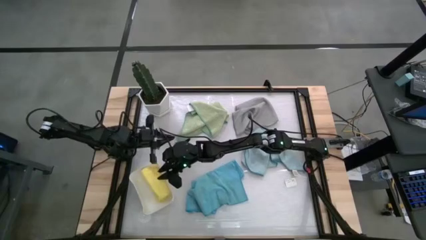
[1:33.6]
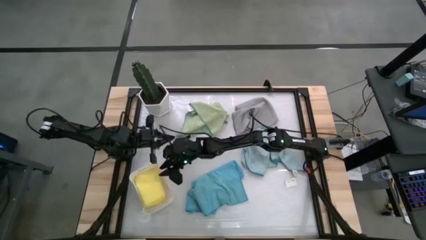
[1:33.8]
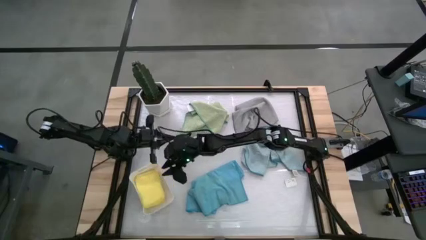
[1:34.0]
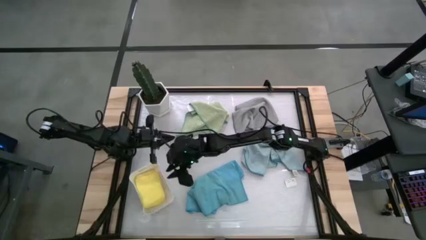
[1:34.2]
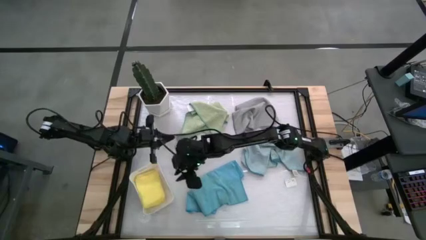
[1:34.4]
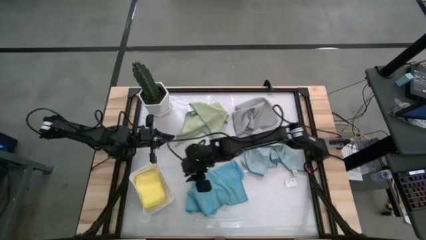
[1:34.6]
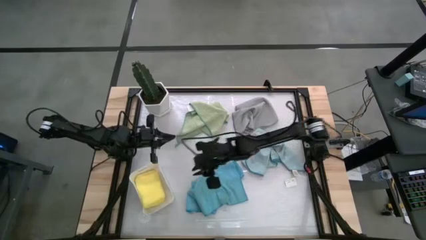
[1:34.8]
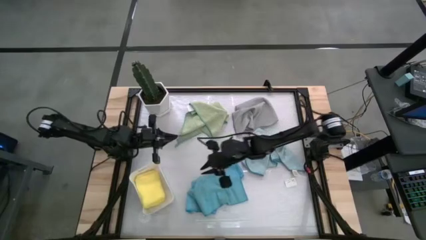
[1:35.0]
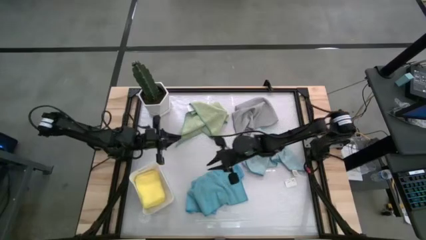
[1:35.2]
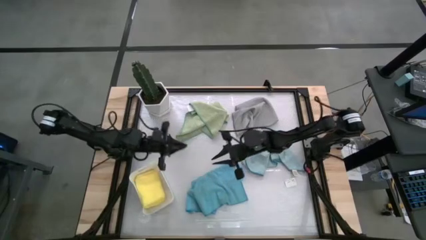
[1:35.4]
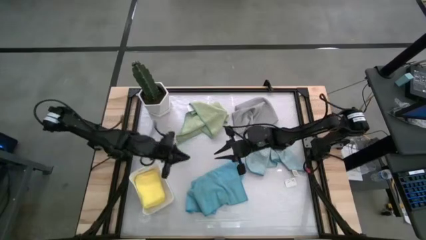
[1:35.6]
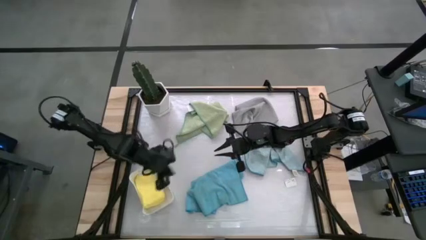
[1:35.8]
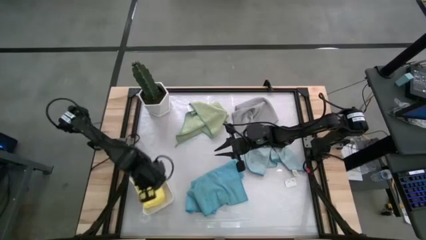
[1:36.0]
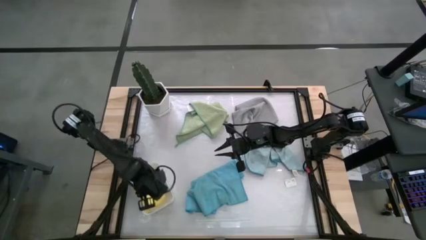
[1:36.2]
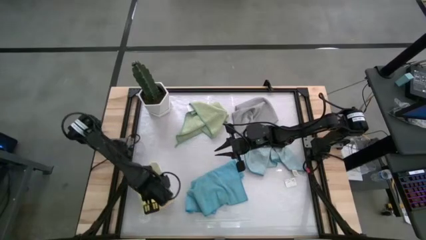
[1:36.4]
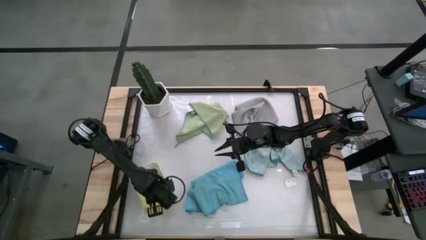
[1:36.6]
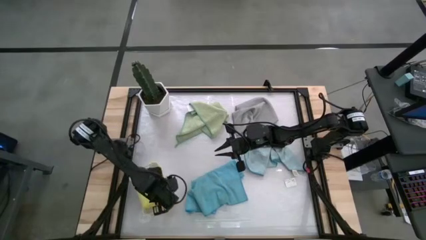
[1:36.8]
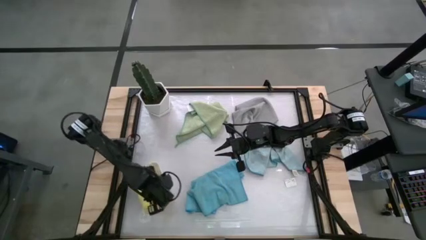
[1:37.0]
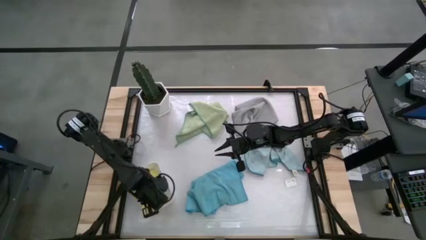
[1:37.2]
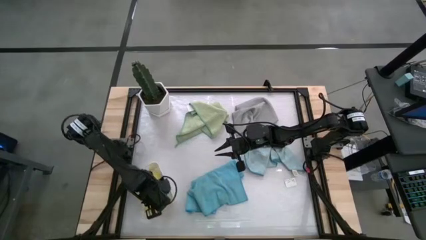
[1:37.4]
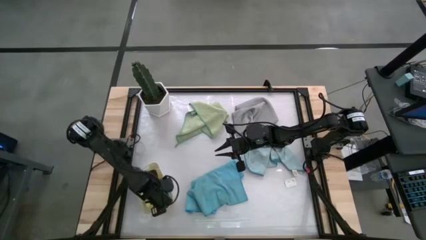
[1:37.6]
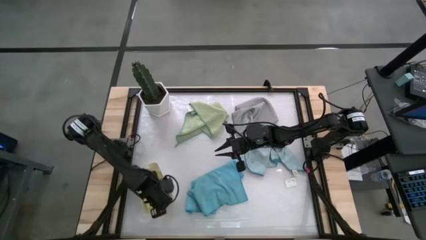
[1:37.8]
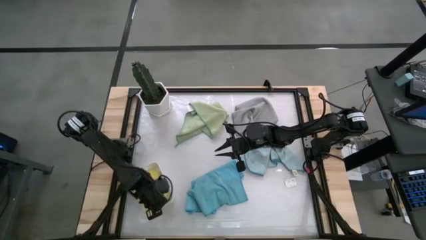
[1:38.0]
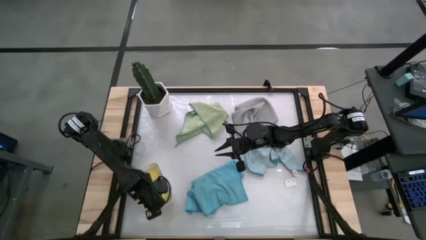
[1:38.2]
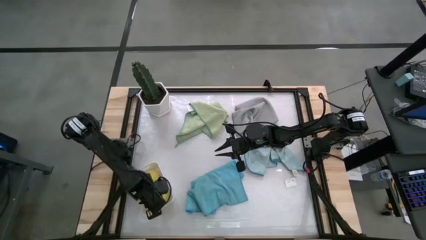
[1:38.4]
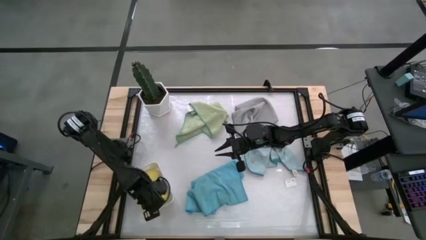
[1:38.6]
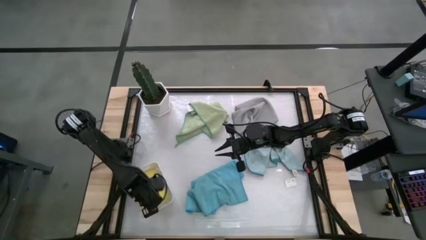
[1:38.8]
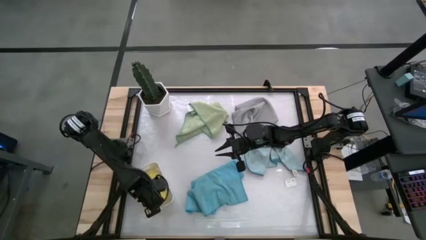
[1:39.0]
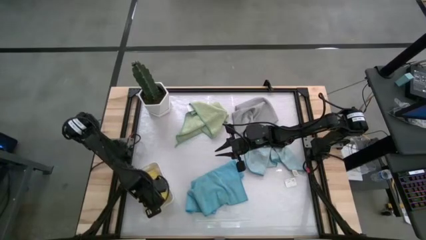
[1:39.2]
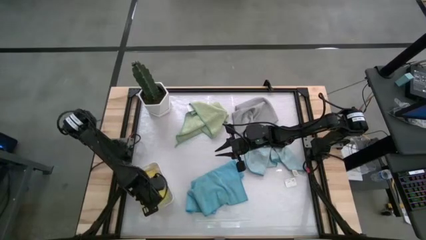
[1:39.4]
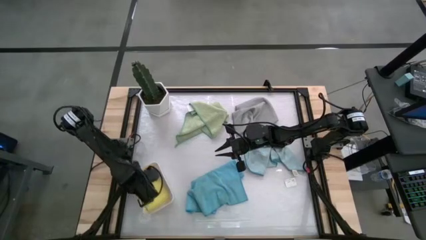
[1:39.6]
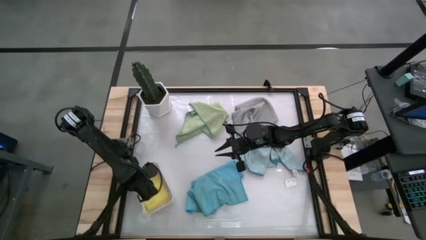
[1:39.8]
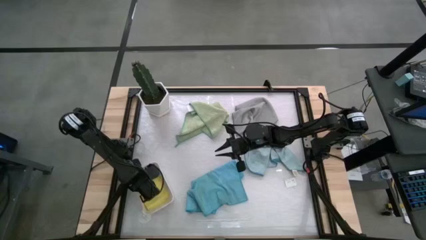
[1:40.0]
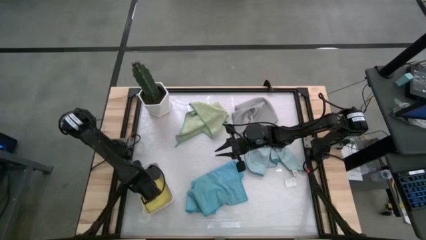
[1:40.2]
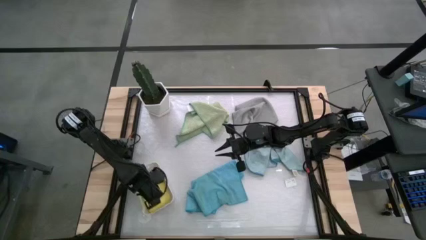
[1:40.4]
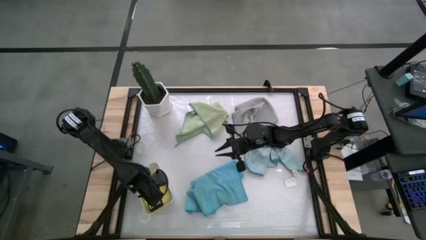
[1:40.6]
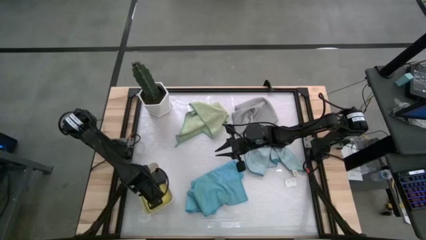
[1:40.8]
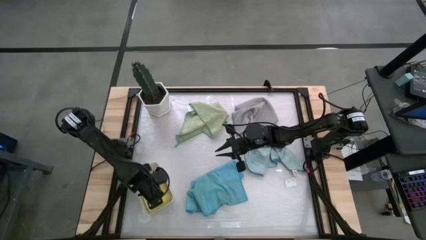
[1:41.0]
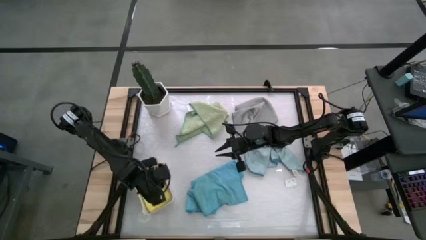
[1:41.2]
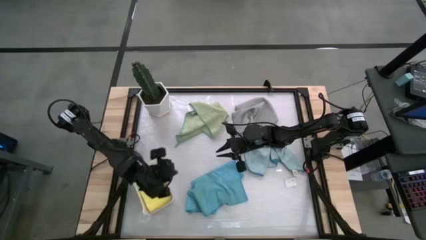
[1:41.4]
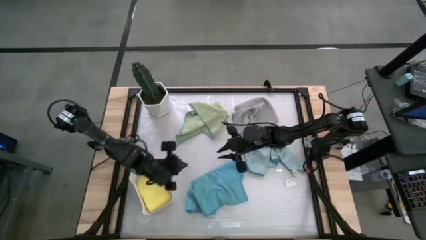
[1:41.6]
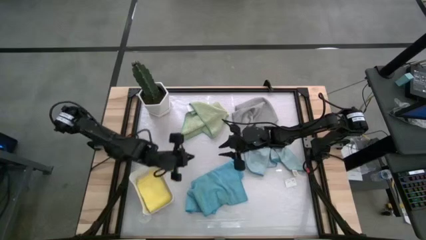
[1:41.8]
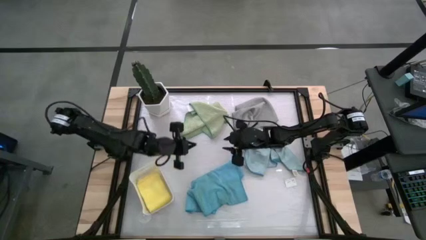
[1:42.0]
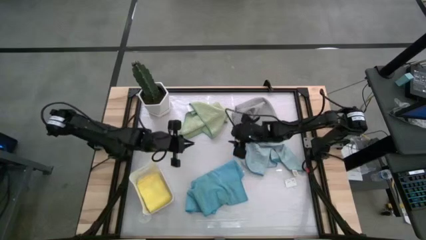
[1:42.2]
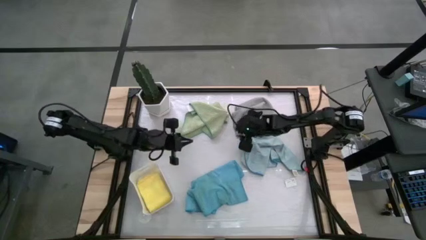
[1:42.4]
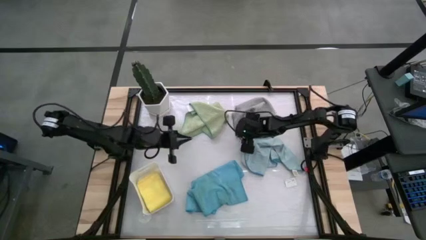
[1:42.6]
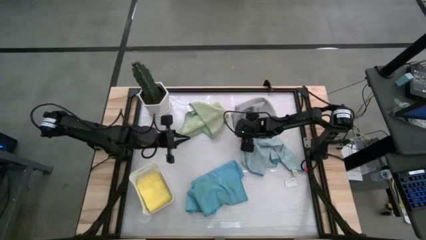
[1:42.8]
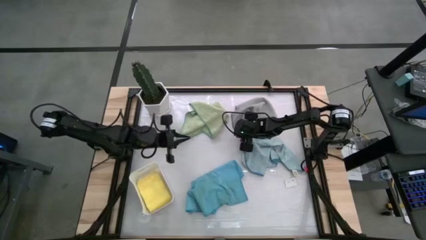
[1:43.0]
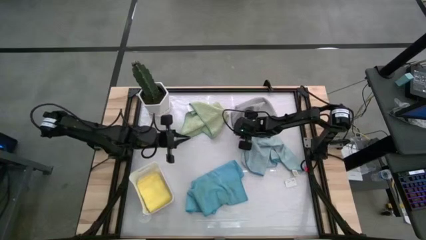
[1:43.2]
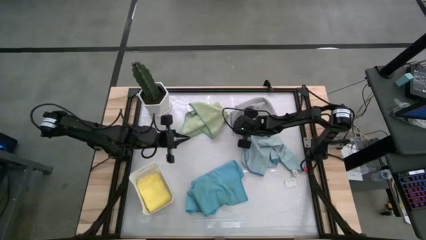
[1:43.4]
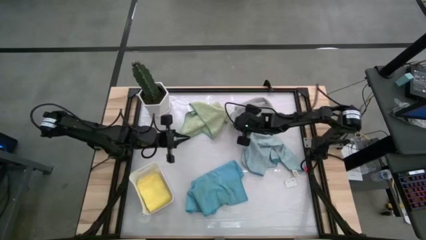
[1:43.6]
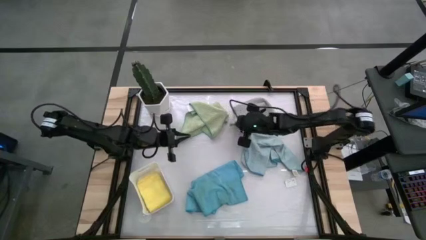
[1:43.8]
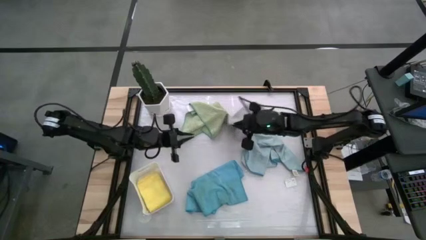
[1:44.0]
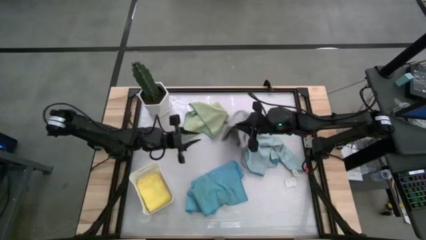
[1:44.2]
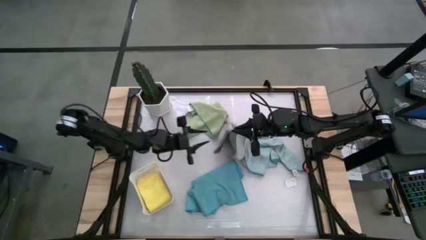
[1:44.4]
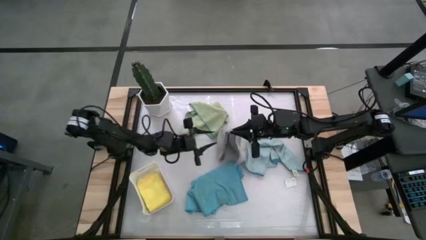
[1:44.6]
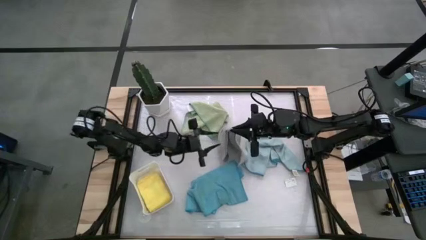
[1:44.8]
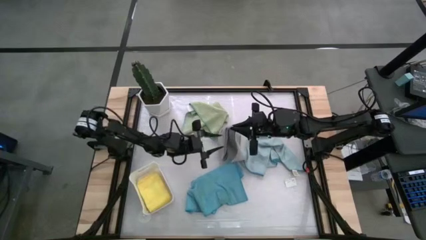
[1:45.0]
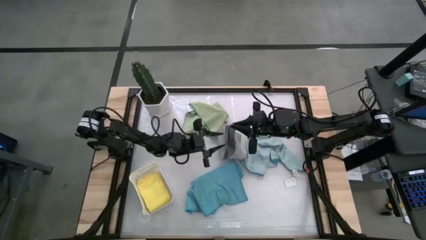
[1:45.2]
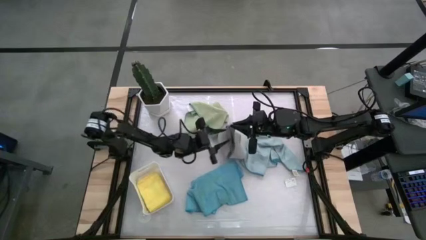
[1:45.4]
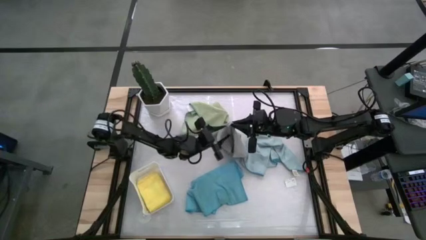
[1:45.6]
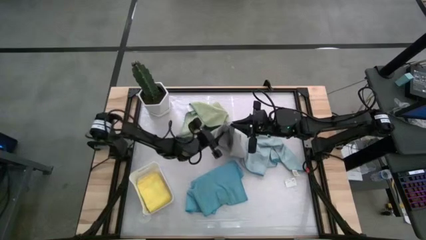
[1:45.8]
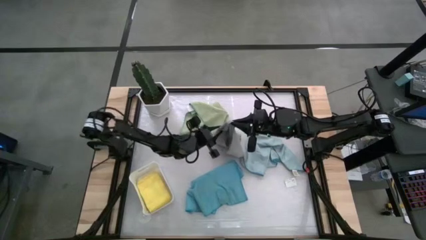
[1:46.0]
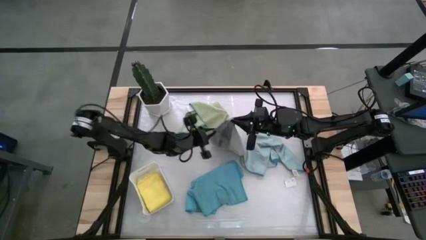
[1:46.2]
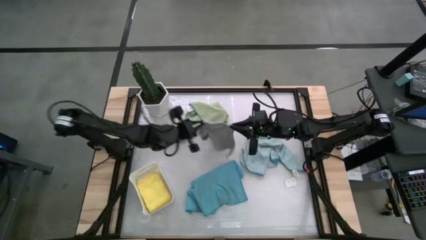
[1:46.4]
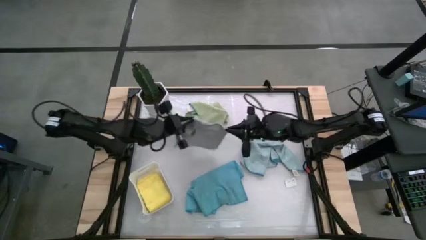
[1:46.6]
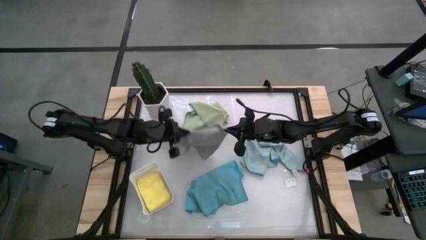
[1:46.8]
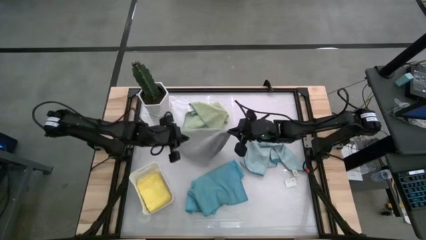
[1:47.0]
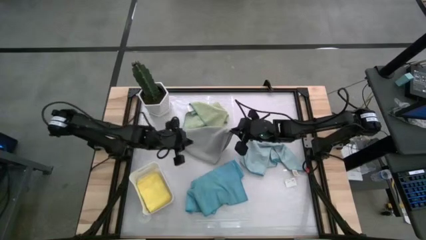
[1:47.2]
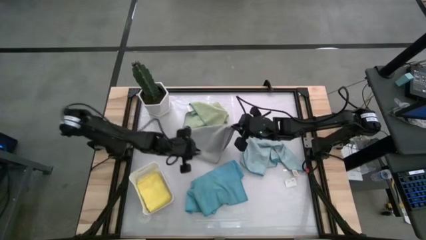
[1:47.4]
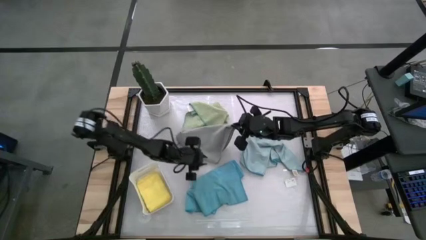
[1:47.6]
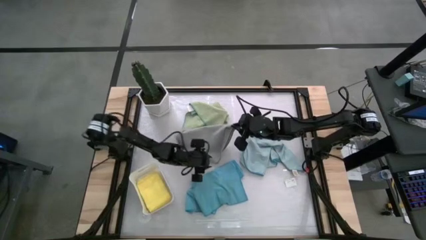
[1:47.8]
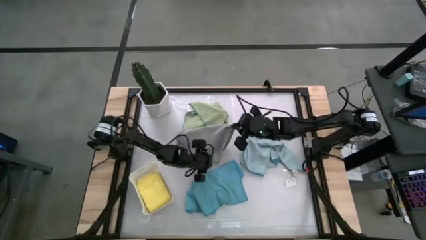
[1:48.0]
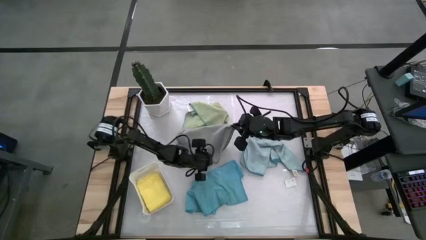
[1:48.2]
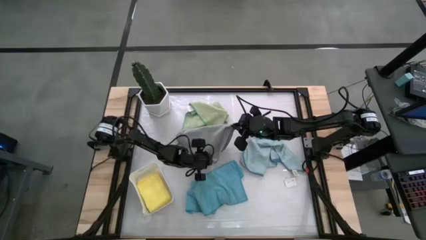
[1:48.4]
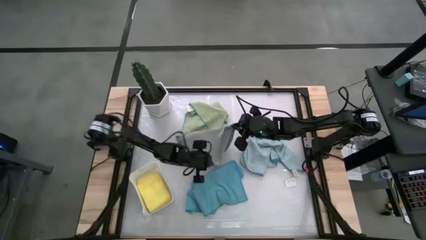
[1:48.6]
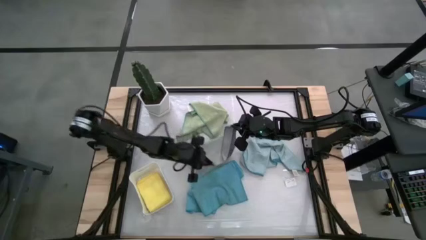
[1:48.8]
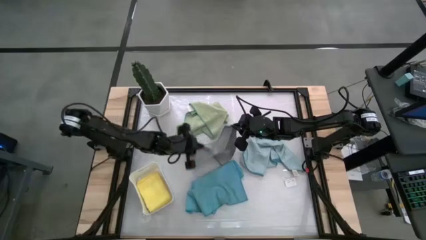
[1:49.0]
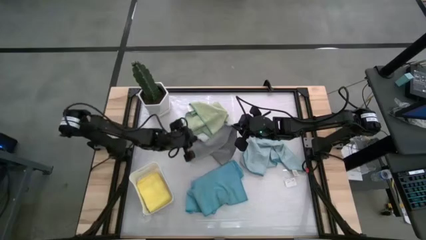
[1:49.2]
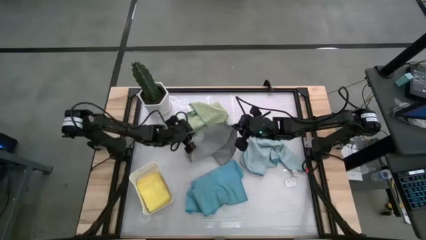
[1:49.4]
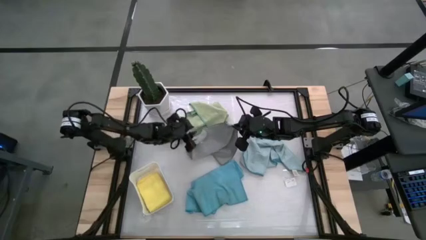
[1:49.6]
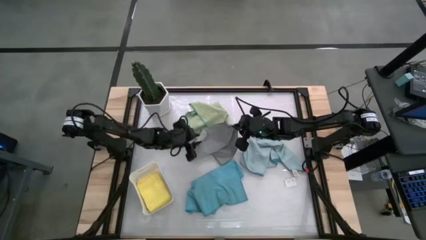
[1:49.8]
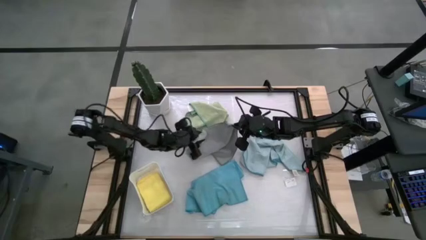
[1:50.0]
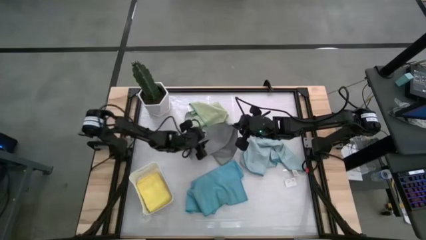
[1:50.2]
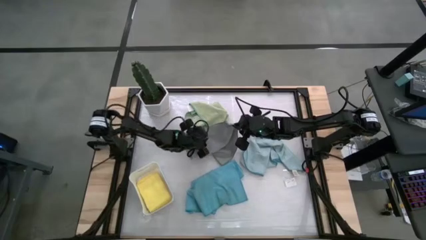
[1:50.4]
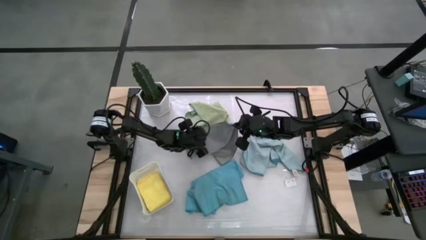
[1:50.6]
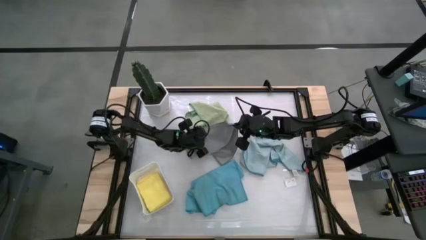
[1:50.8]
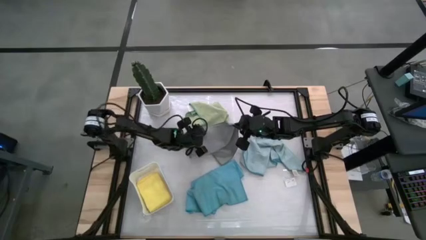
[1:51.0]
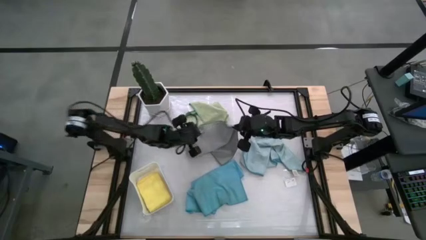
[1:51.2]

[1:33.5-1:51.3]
Task: Fold microfiber towels
Fold the gray microfiber towel
